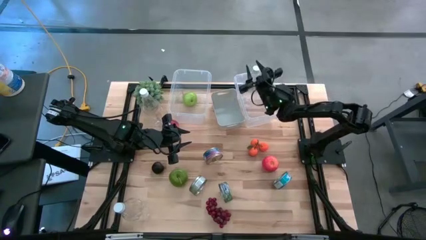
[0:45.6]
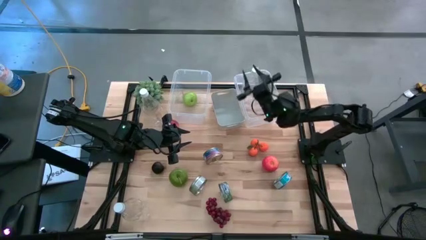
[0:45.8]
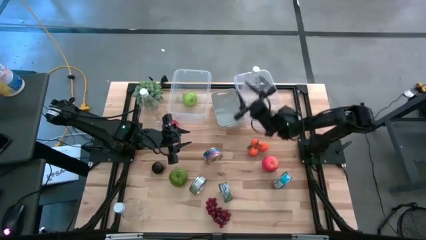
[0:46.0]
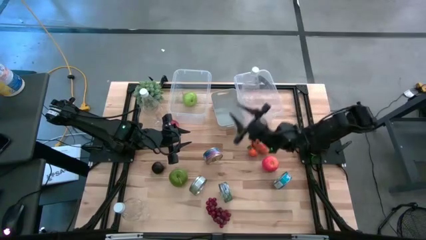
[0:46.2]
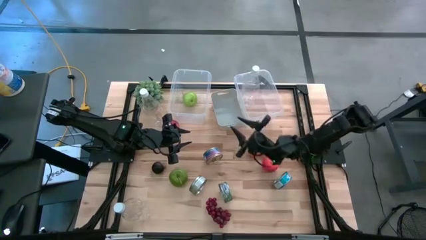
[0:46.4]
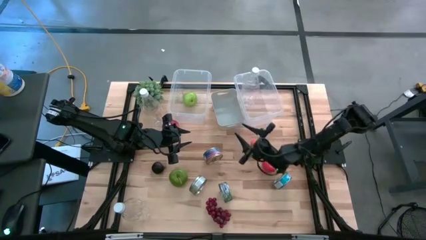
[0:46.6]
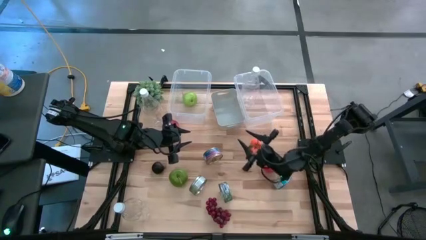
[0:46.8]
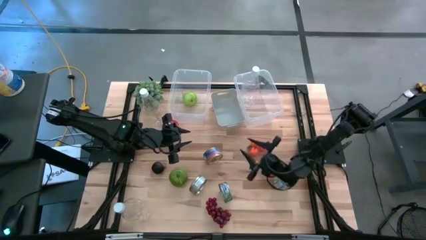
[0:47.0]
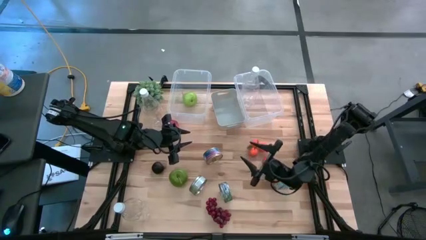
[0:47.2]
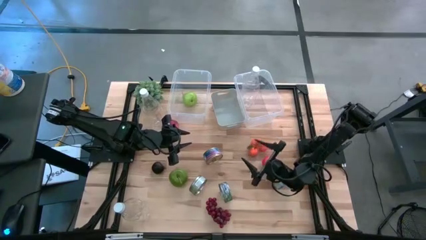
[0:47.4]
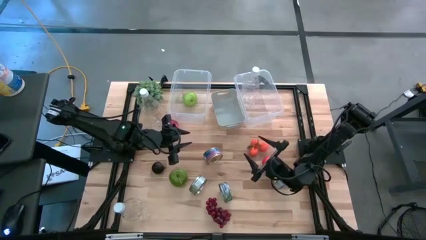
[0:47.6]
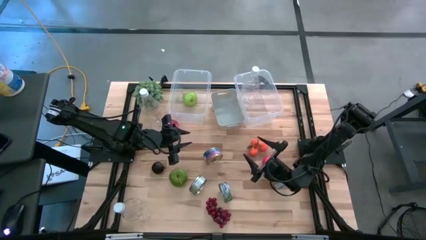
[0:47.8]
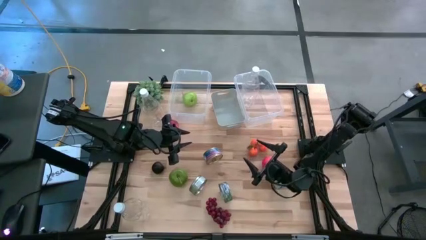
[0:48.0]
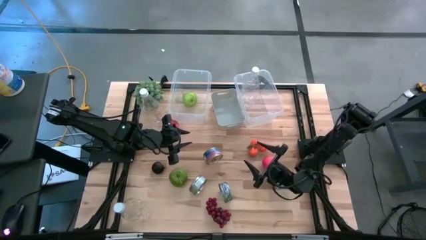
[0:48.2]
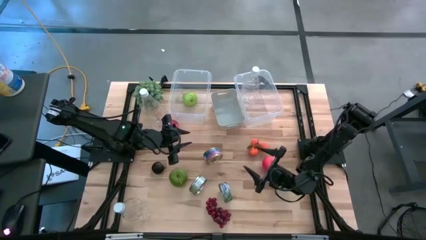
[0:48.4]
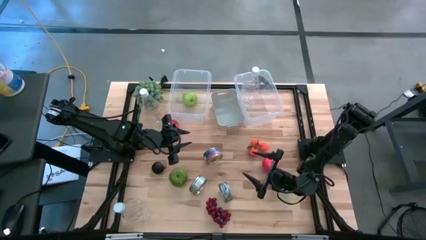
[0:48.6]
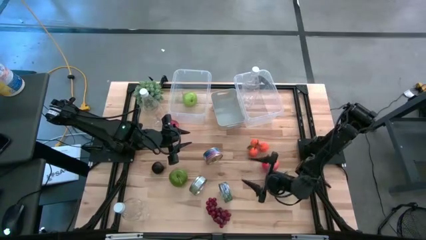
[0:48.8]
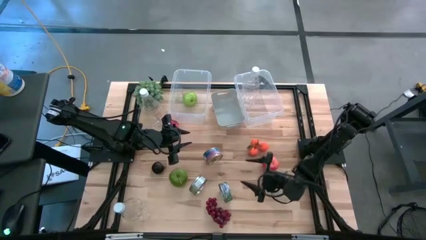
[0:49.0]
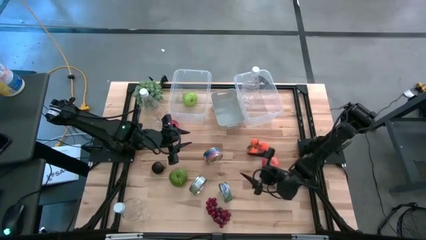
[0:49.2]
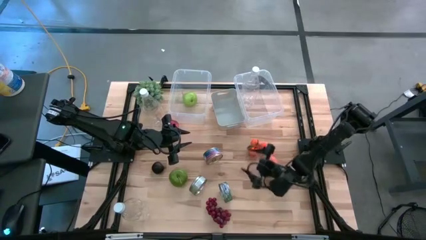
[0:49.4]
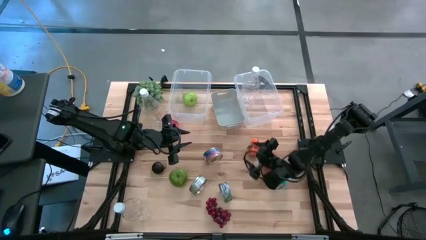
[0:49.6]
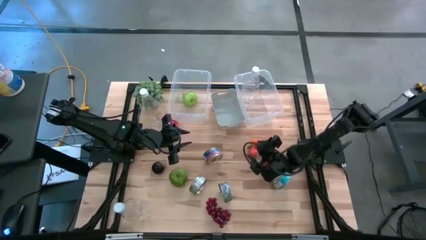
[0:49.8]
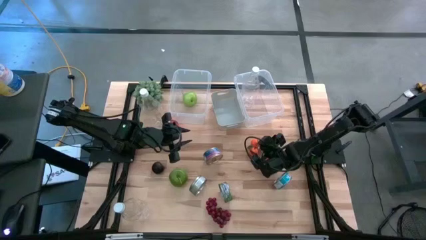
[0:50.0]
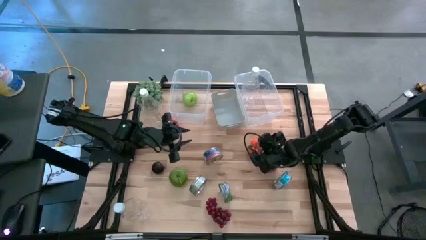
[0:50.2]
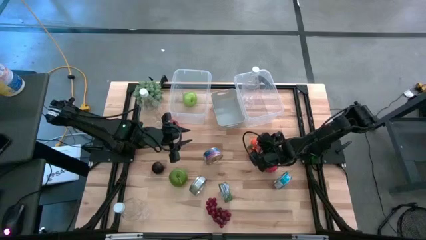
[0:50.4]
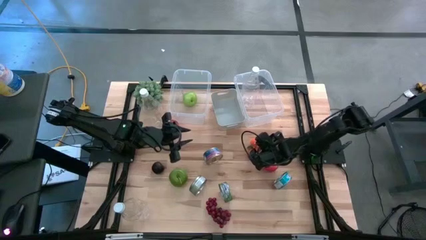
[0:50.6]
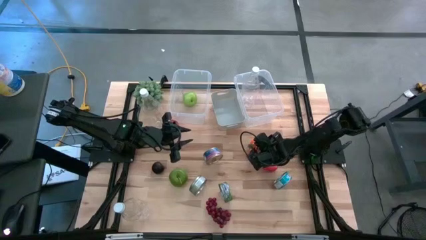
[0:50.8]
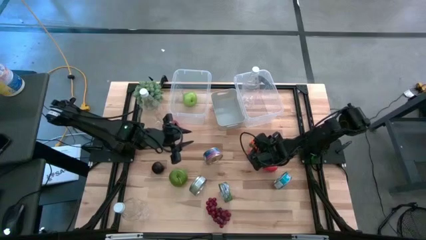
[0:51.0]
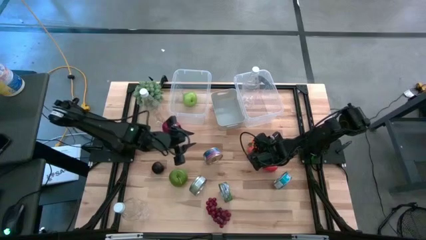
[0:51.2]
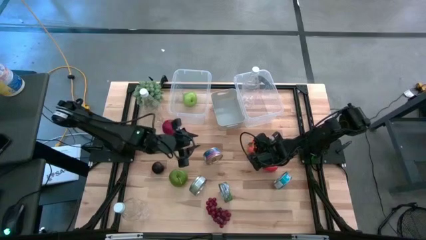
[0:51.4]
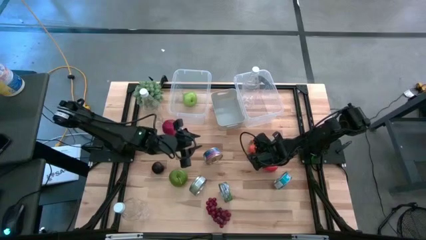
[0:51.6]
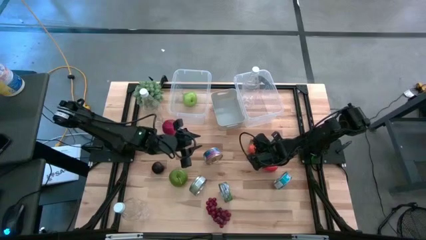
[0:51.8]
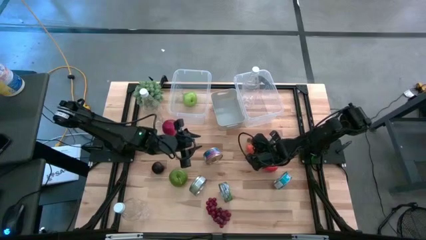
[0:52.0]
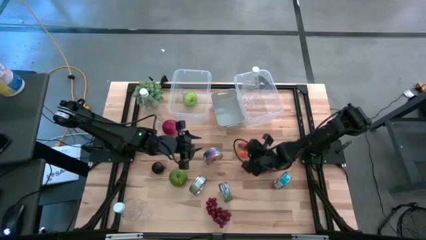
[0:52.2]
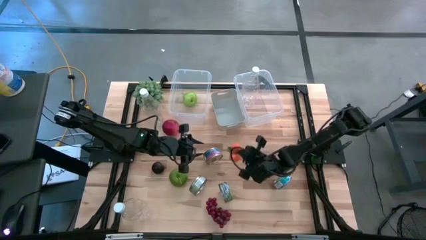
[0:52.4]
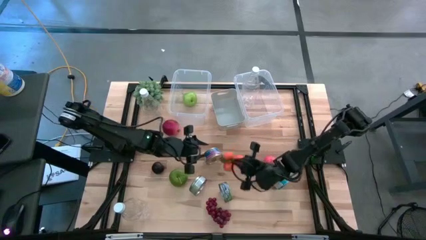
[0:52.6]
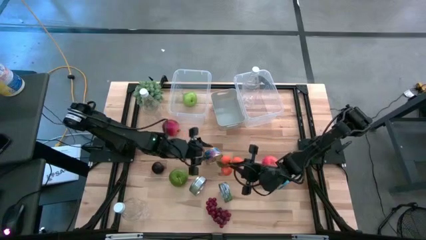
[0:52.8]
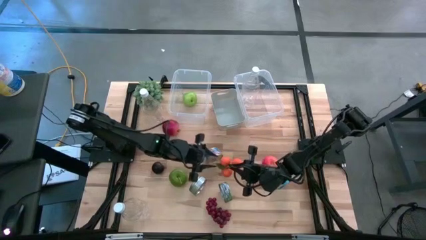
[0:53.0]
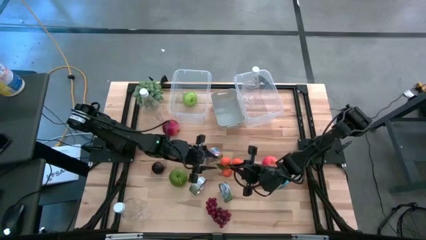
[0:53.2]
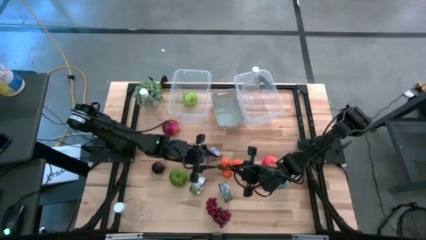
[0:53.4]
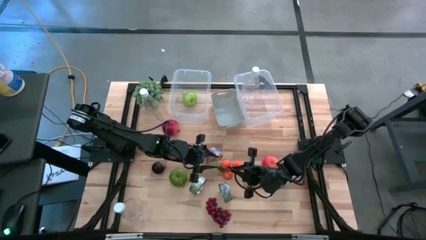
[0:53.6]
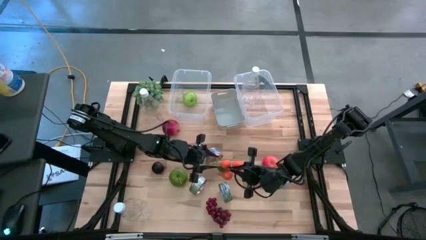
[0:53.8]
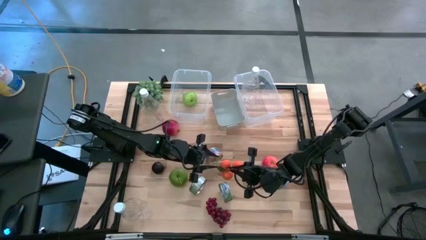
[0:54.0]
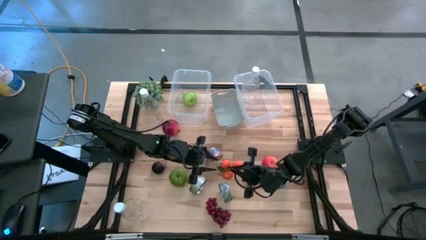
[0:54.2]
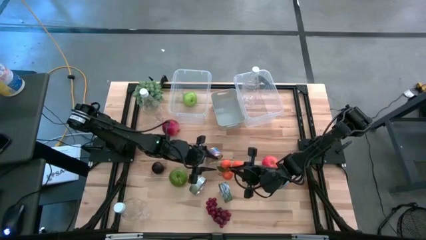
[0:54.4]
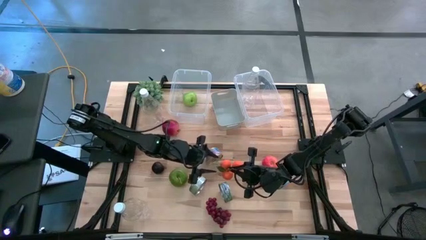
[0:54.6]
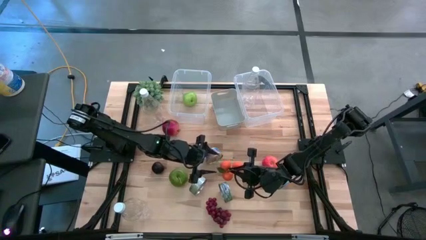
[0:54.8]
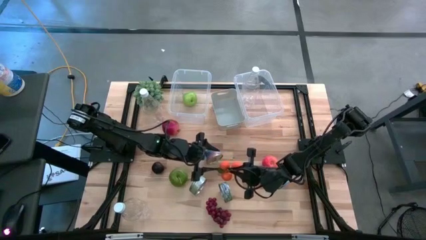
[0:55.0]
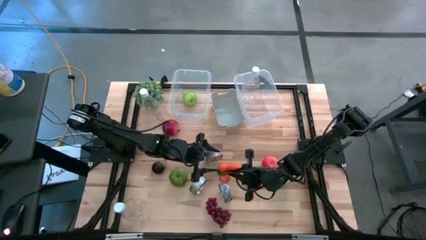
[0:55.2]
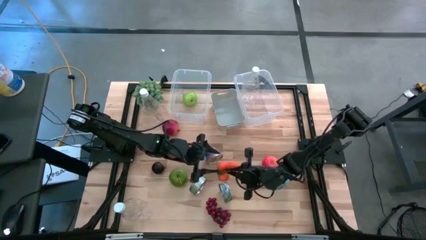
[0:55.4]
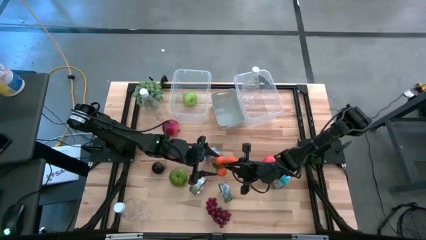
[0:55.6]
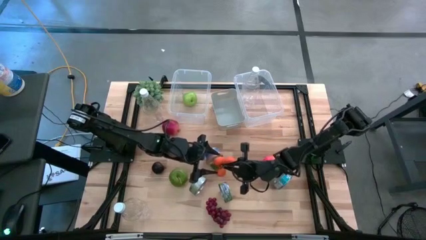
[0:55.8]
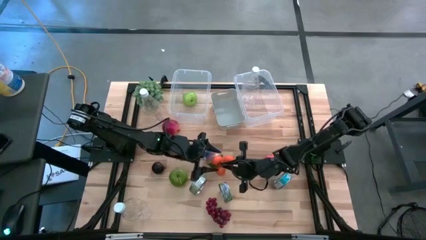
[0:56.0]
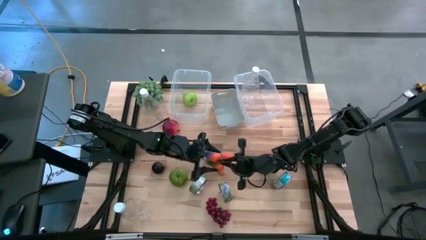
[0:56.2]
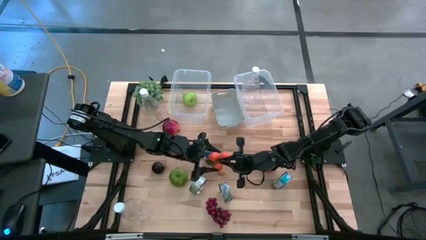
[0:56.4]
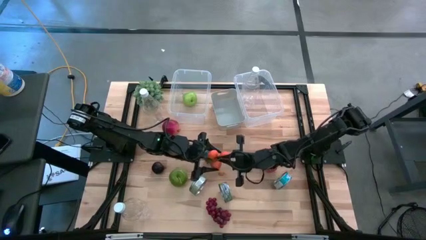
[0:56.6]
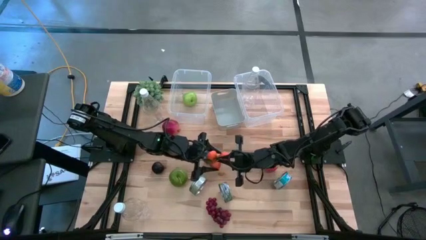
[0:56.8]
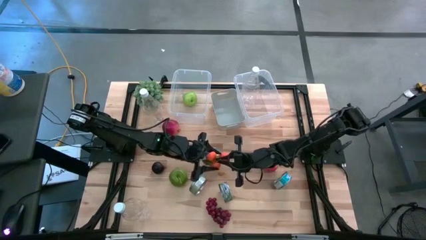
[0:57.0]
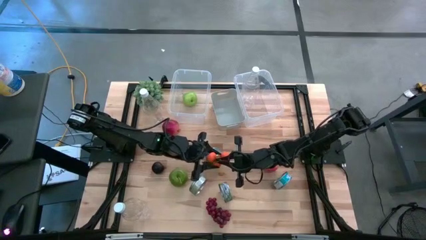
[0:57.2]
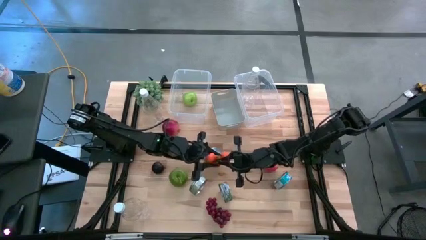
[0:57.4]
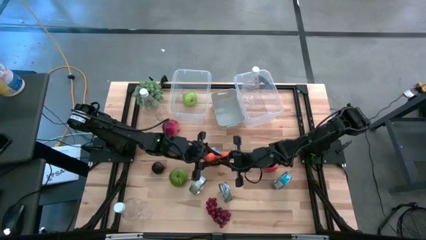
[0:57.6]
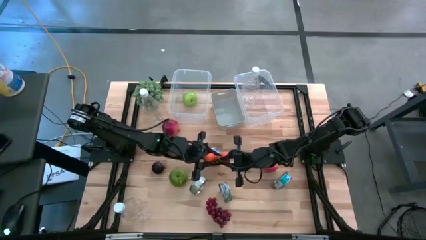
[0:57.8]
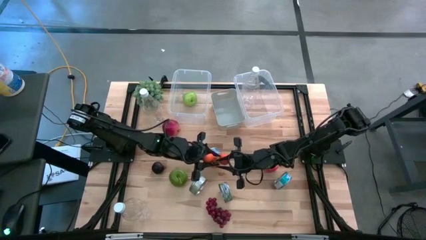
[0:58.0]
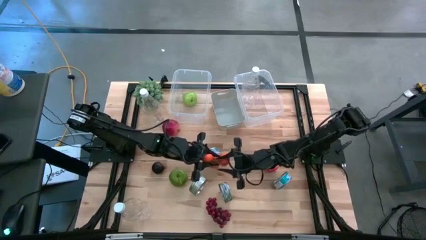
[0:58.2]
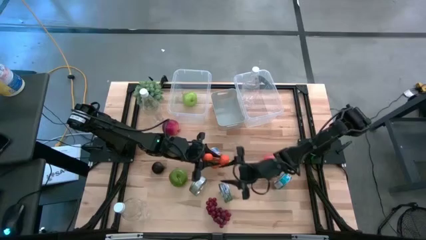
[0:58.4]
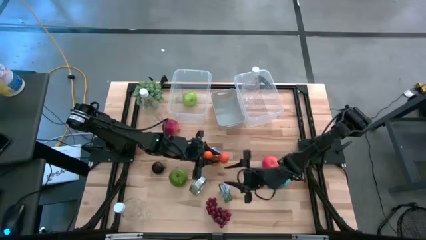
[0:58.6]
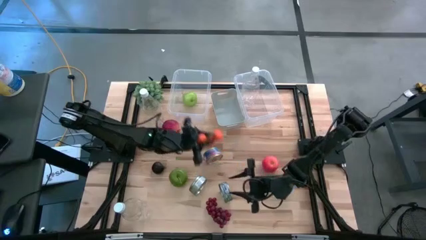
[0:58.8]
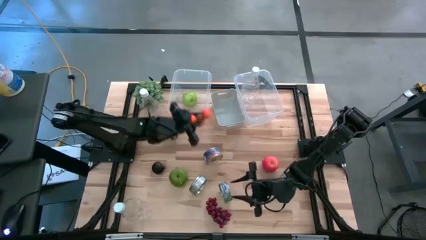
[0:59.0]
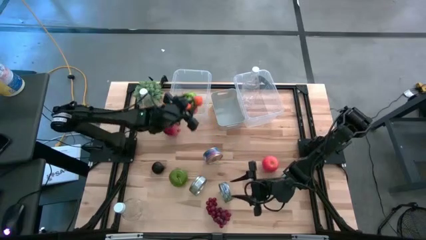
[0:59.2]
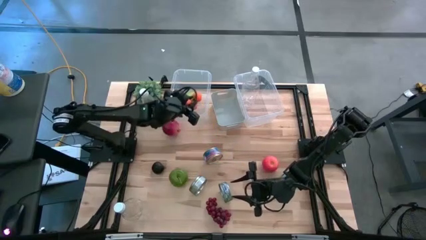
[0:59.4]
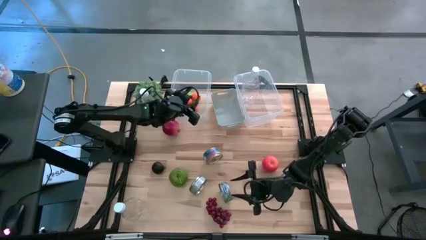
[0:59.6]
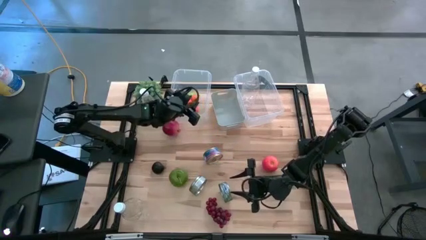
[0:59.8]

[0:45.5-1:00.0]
Task: Pick & Place Food Item
Put the tangerine into the left transparent bin
